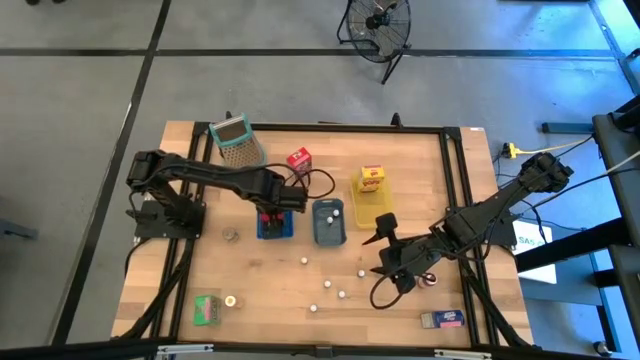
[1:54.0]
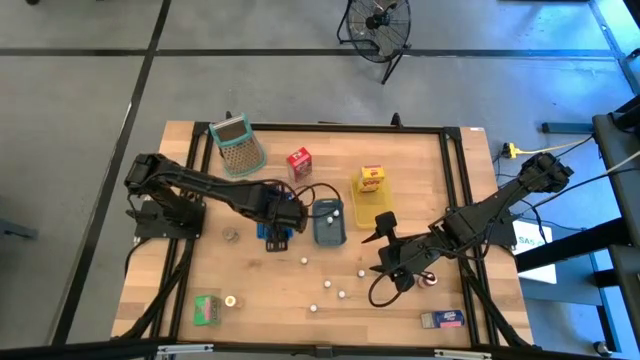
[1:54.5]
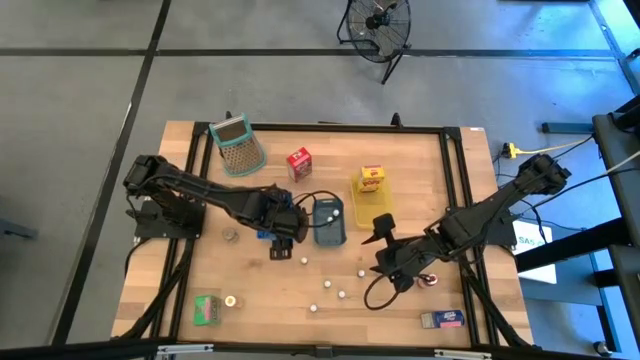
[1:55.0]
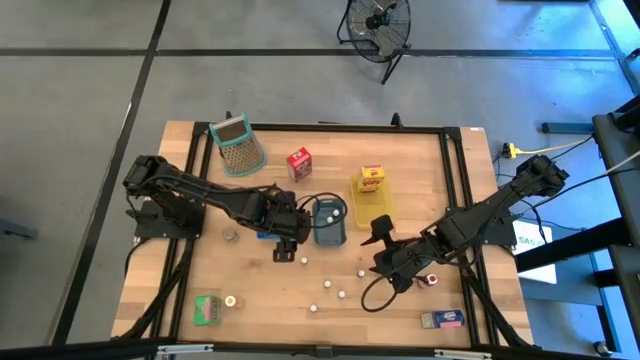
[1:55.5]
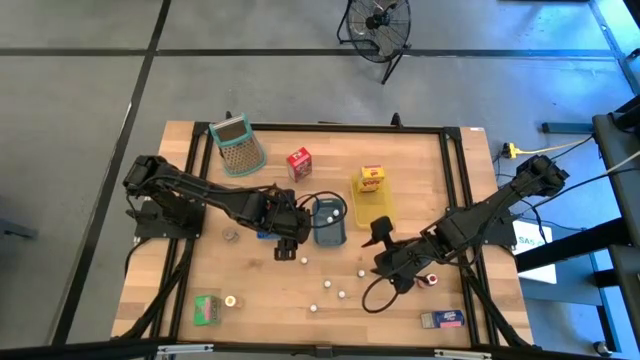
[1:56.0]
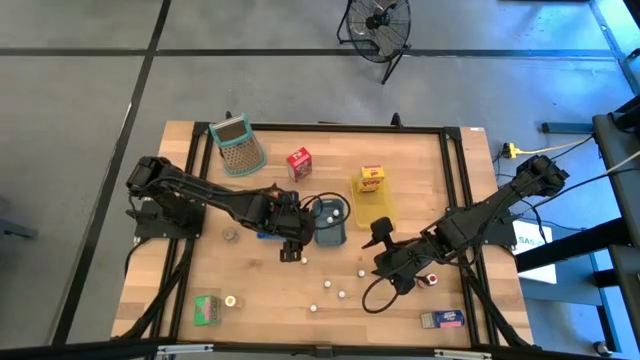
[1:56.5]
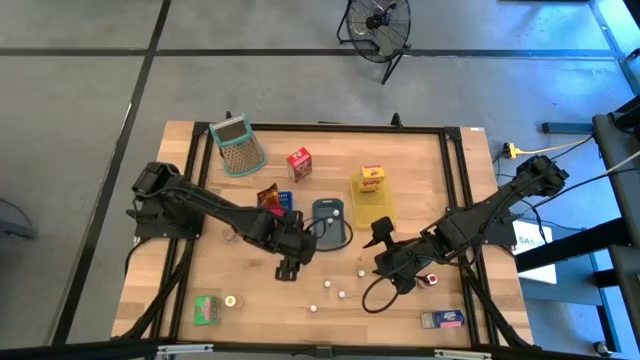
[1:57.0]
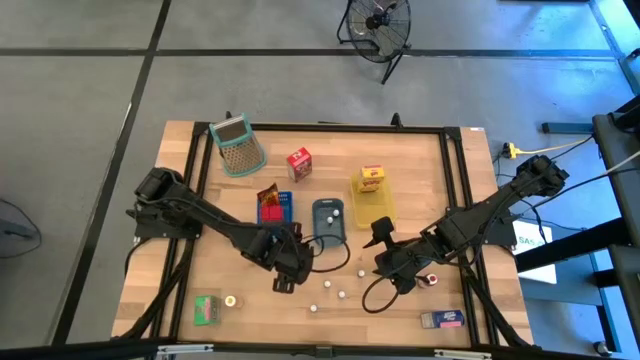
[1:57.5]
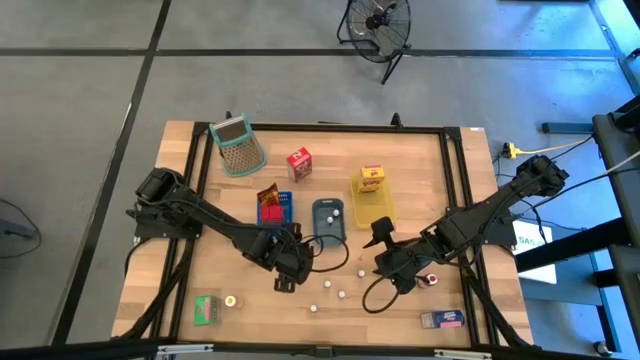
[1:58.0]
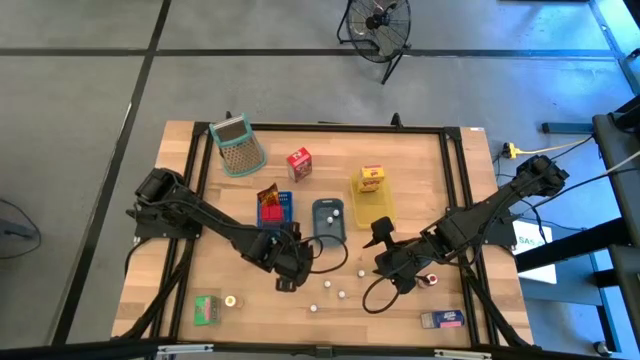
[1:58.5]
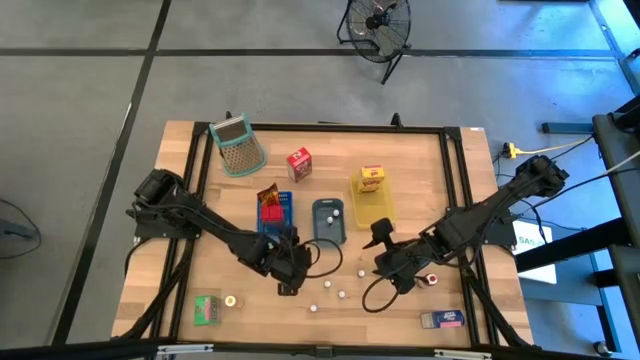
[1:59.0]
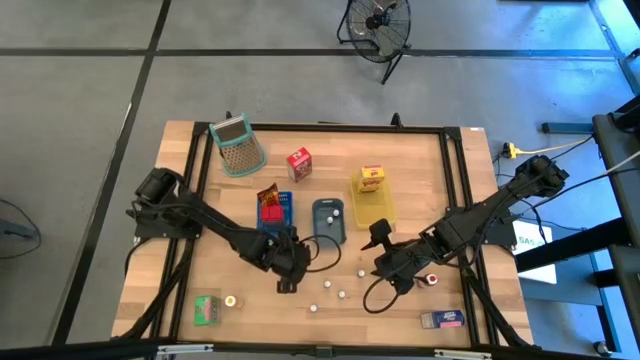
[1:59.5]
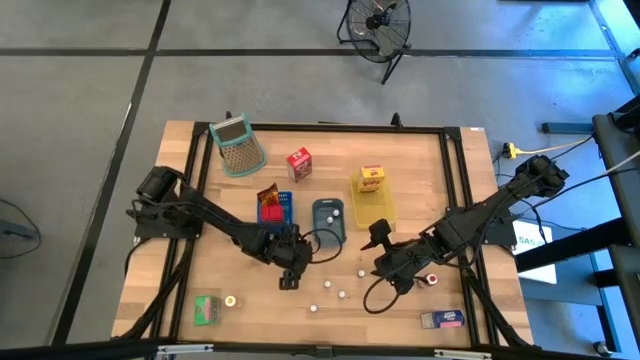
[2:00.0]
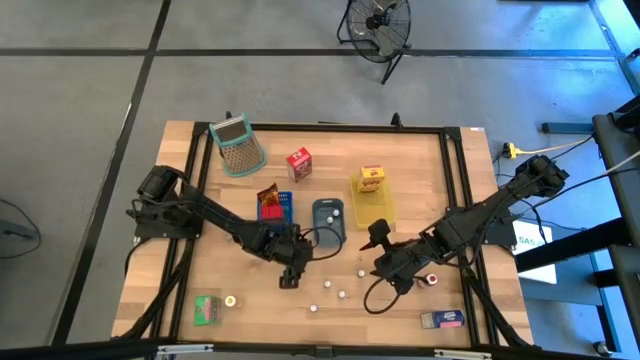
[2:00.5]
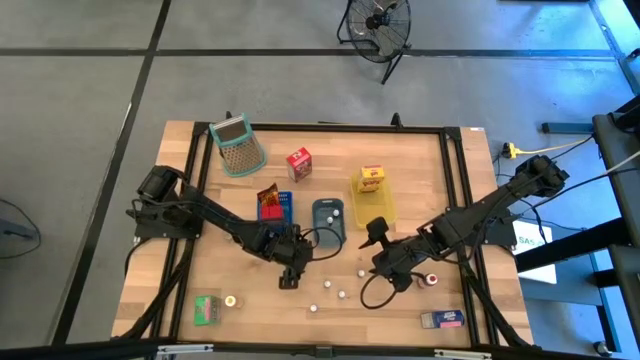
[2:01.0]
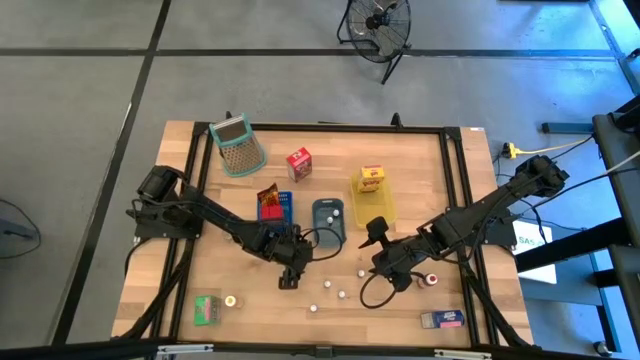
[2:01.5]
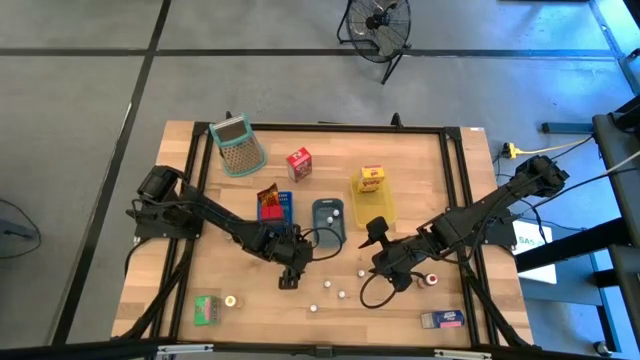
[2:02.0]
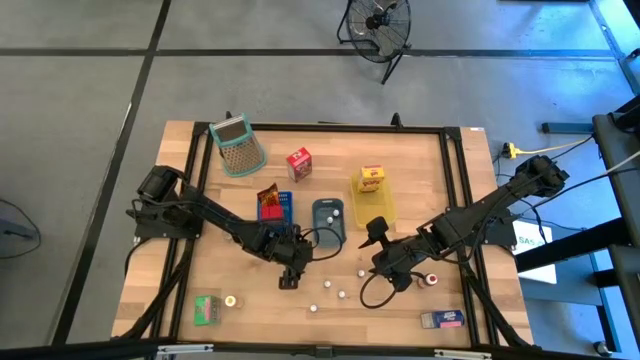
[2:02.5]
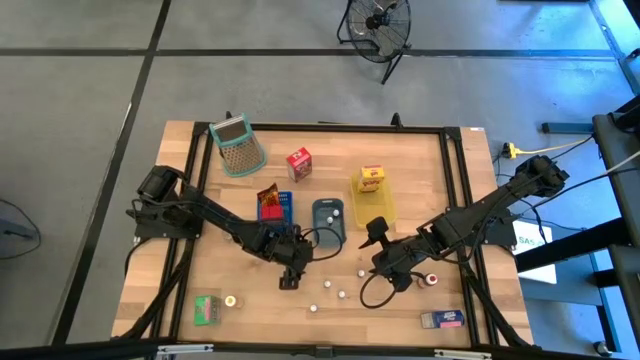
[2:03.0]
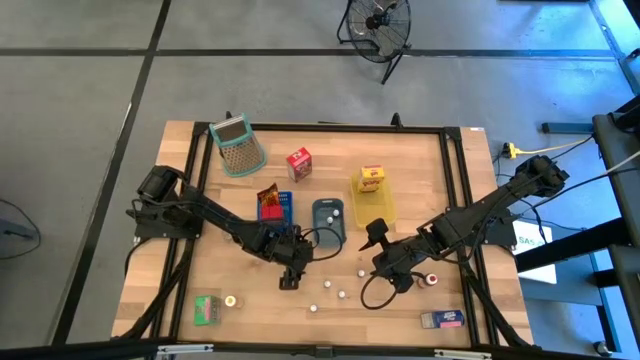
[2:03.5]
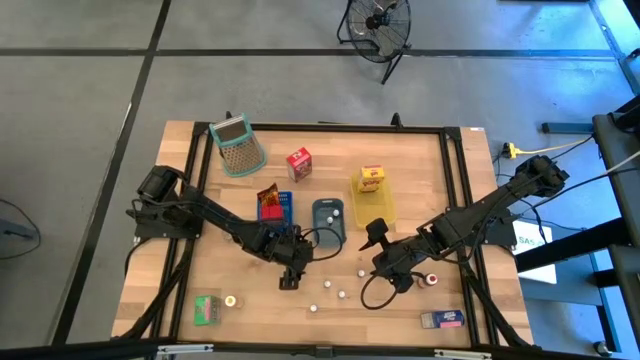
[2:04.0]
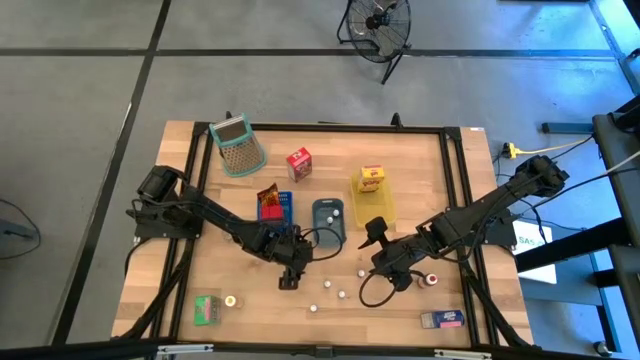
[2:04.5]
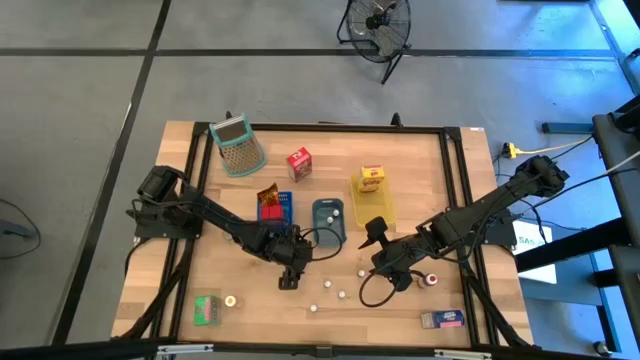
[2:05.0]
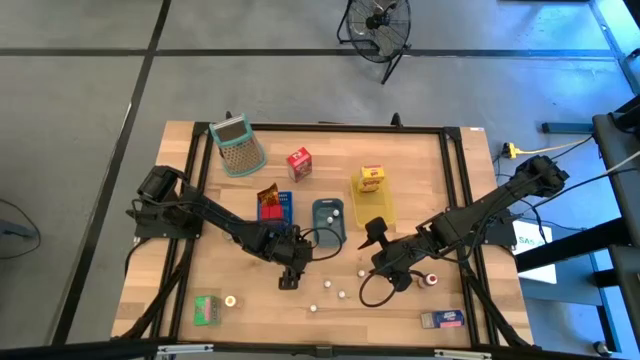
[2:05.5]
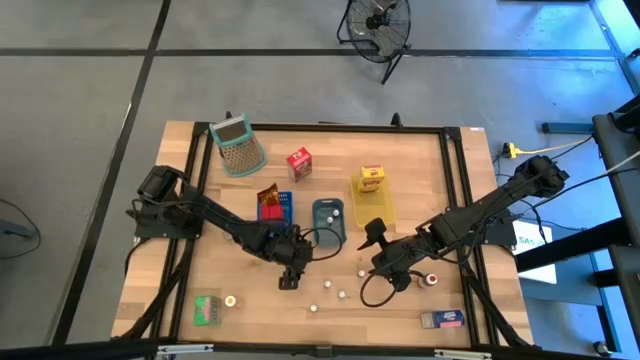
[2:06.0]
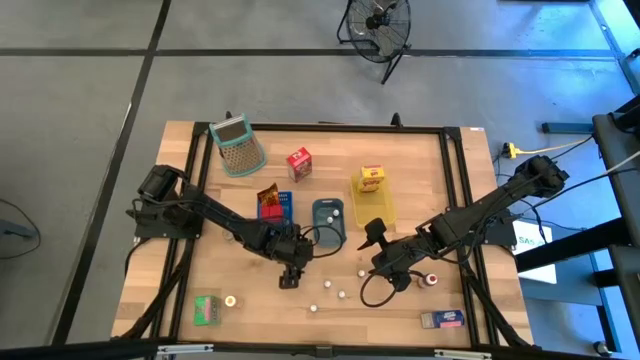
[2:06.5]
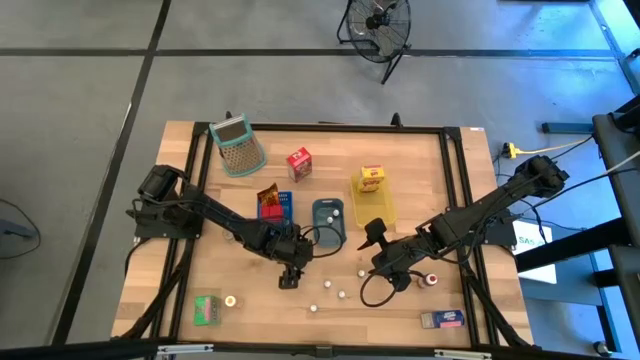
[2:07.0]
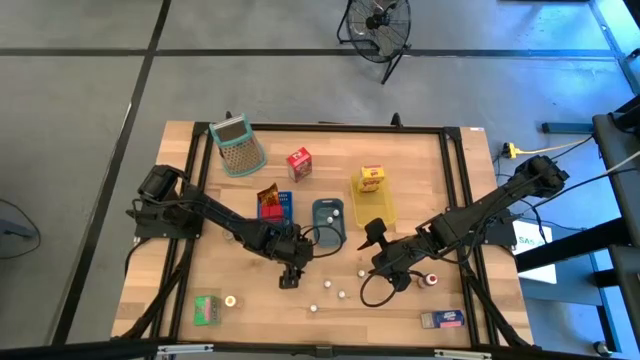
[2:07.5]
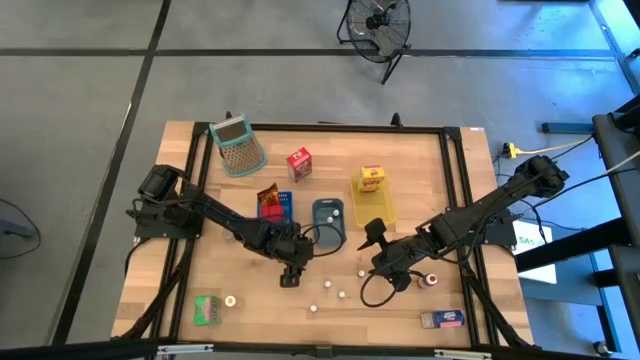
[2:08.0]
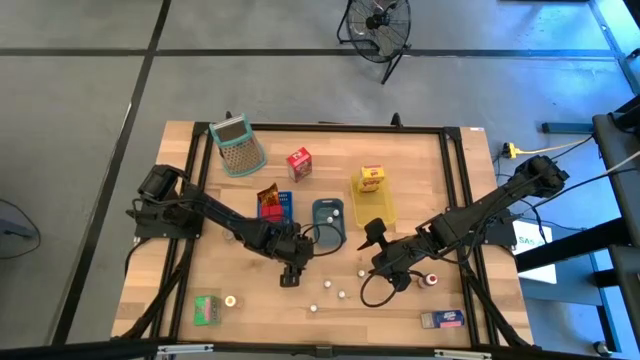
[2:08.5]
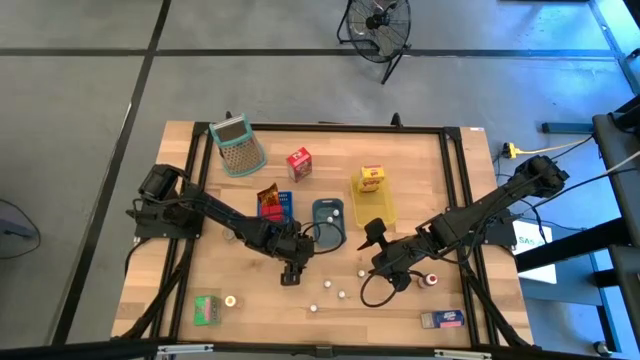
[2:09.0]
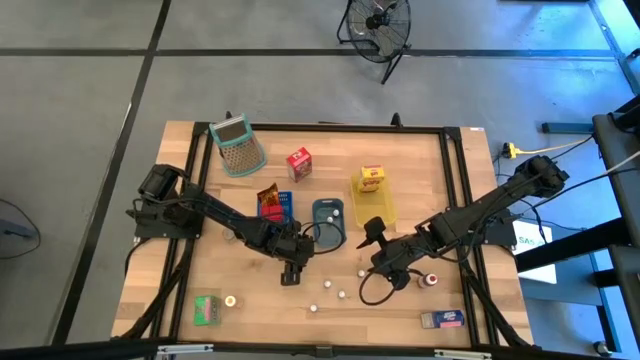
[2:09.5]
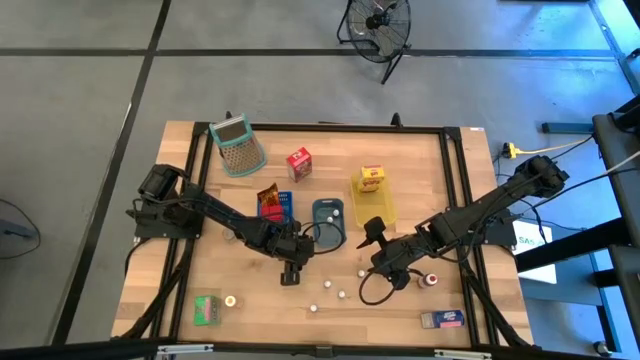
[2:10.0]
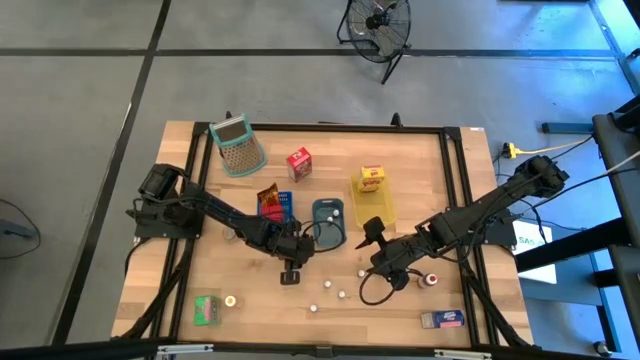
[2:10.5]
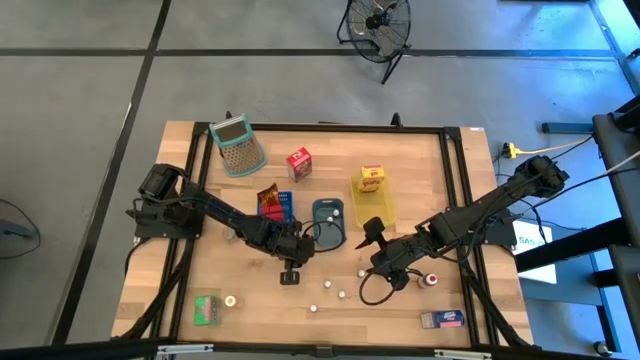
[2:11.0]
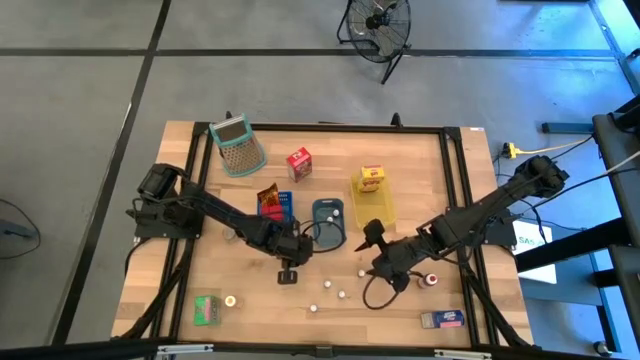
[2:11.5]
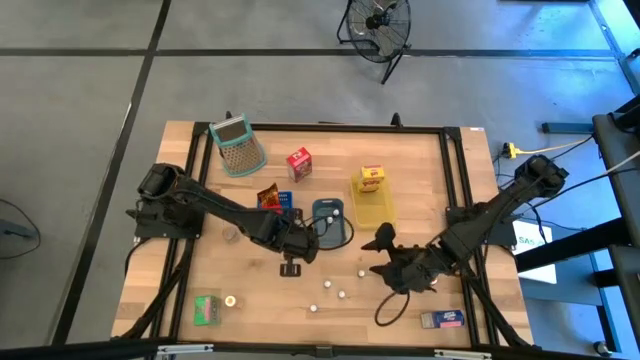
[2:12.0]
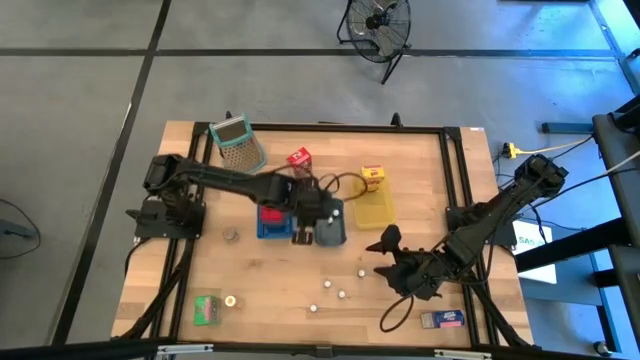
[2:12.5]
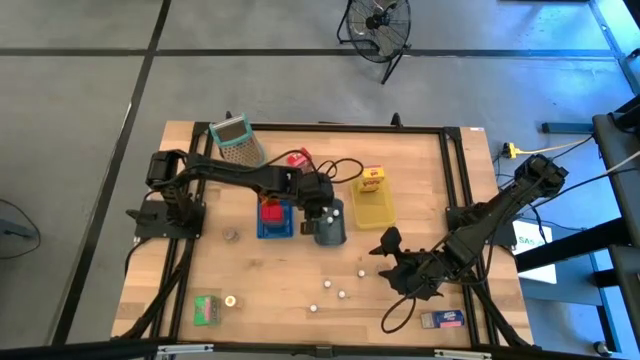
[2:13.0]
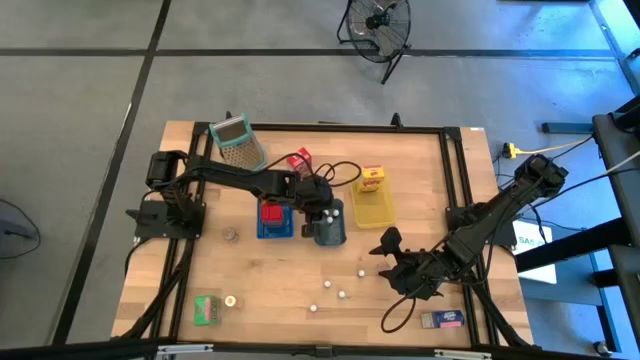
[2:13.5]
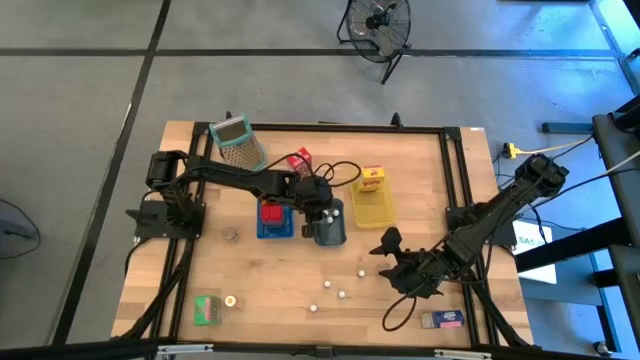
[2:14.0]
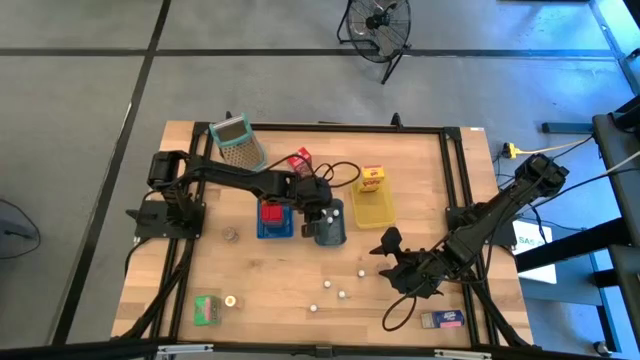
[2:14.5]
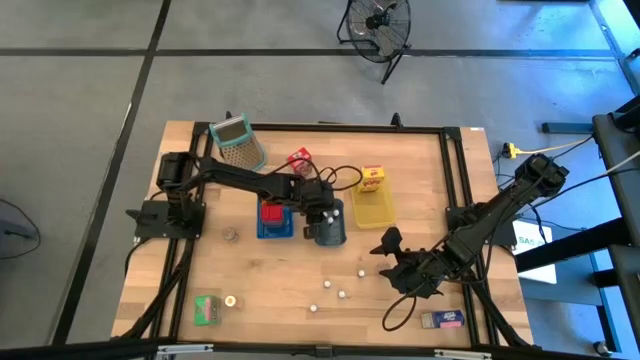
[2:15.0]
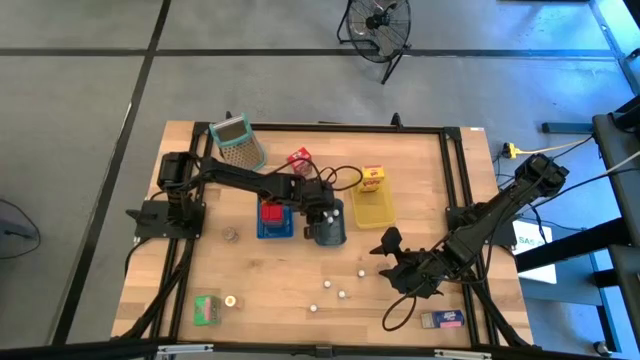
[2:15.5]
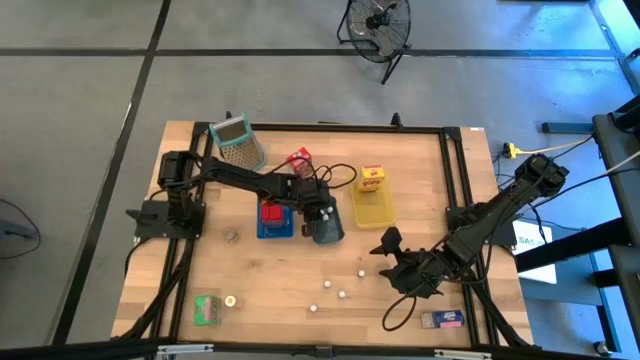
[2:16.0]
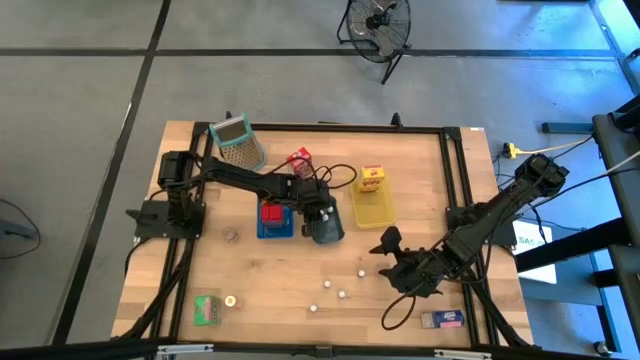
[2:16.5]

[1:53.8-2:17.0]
Task: Pick & Place Kitchen Items
Put the small food coloring bottle into the gray bin
